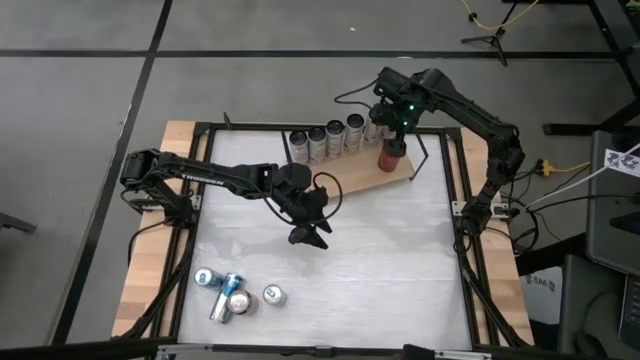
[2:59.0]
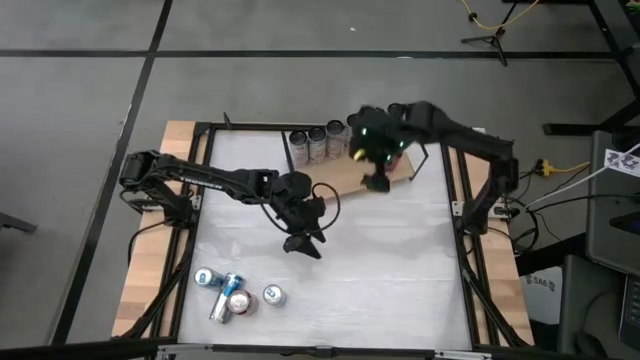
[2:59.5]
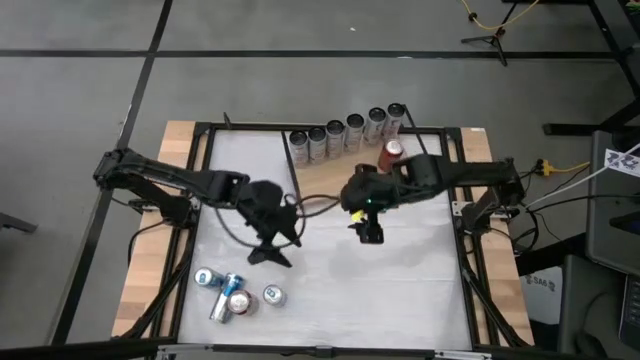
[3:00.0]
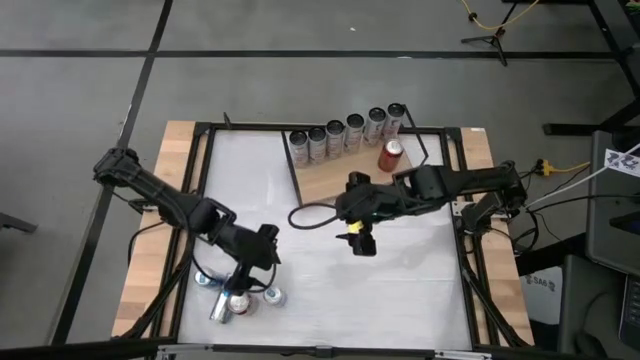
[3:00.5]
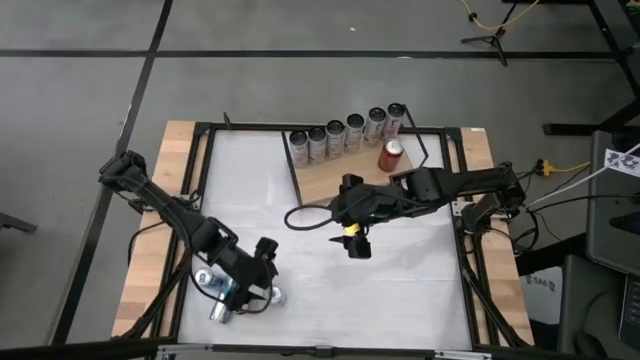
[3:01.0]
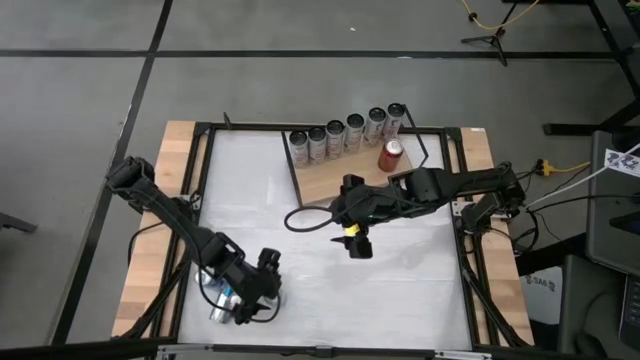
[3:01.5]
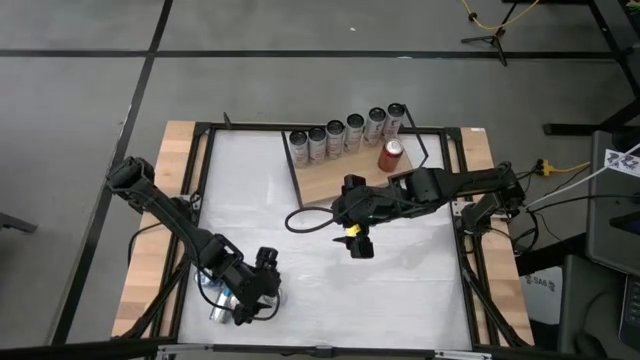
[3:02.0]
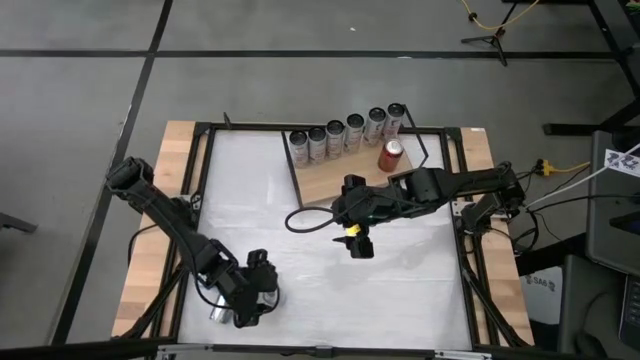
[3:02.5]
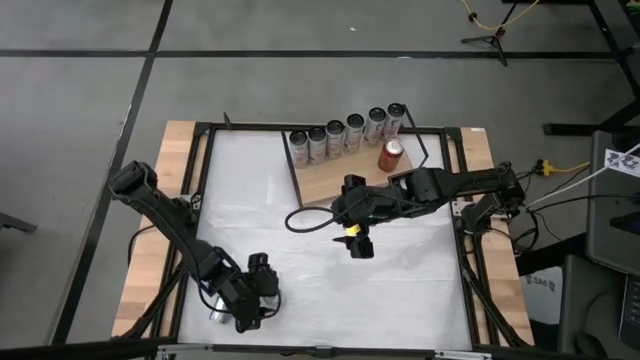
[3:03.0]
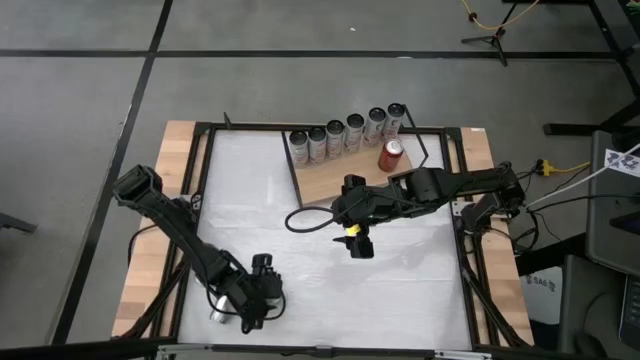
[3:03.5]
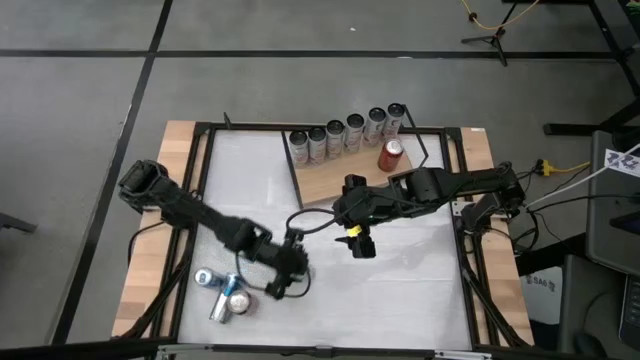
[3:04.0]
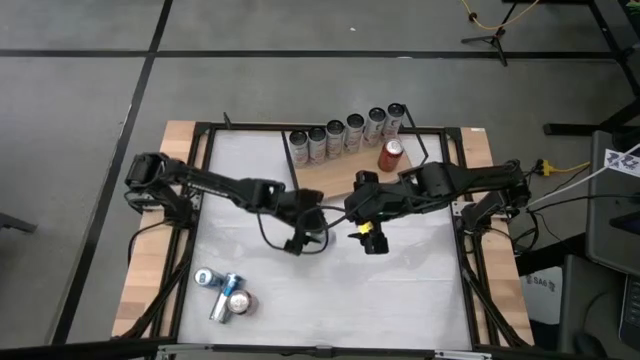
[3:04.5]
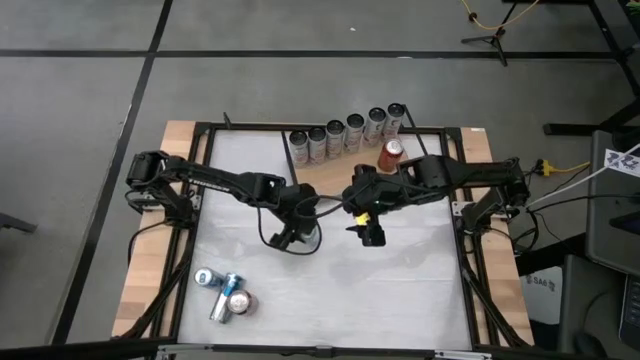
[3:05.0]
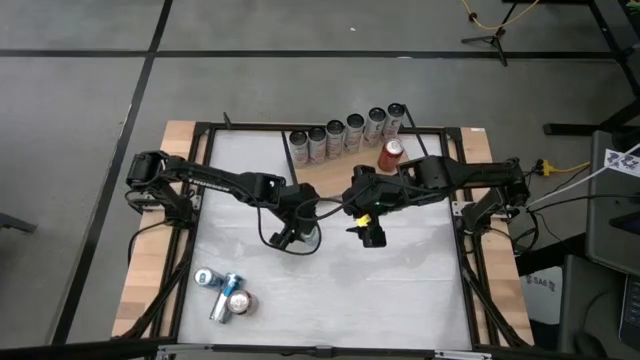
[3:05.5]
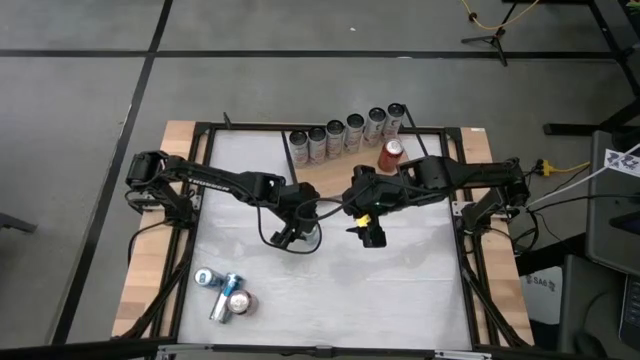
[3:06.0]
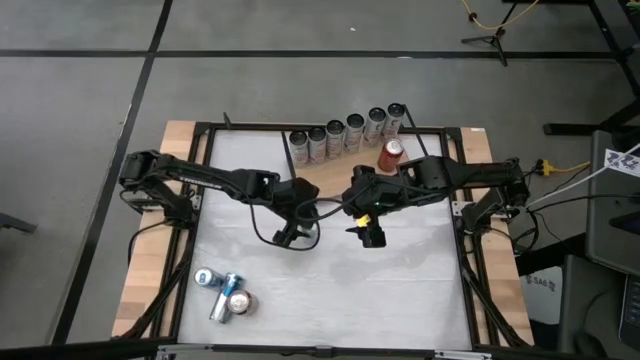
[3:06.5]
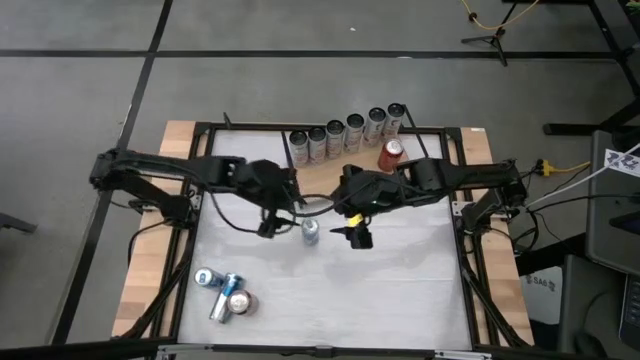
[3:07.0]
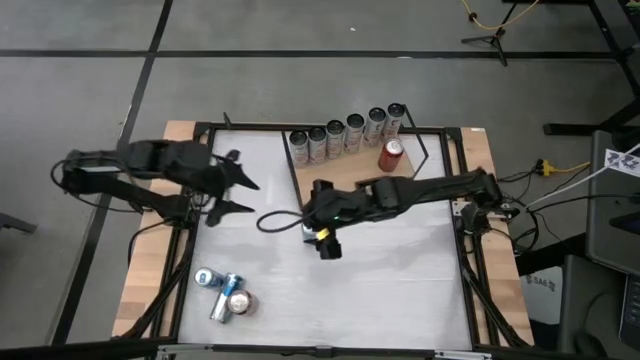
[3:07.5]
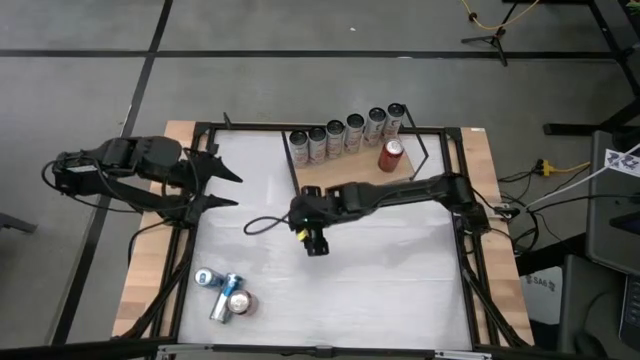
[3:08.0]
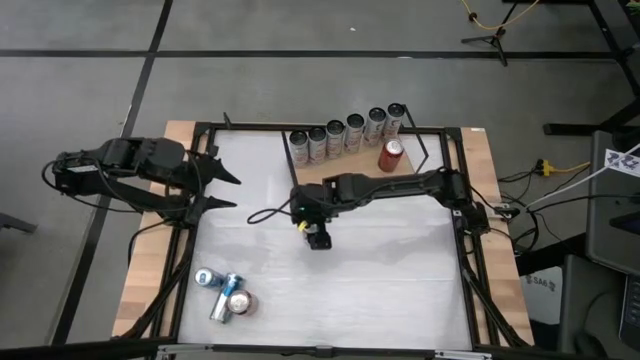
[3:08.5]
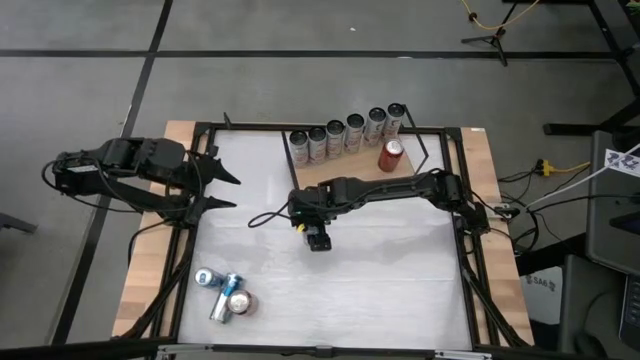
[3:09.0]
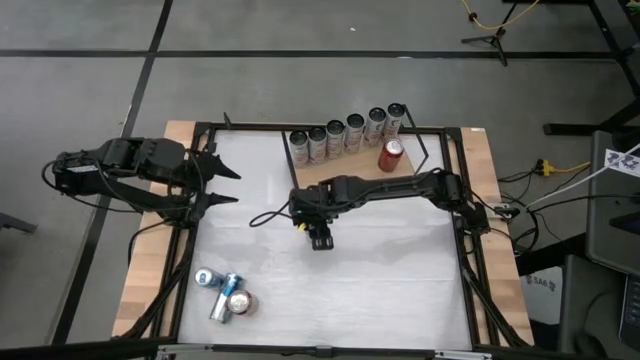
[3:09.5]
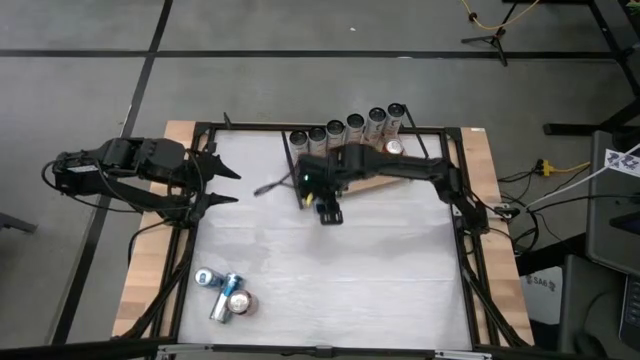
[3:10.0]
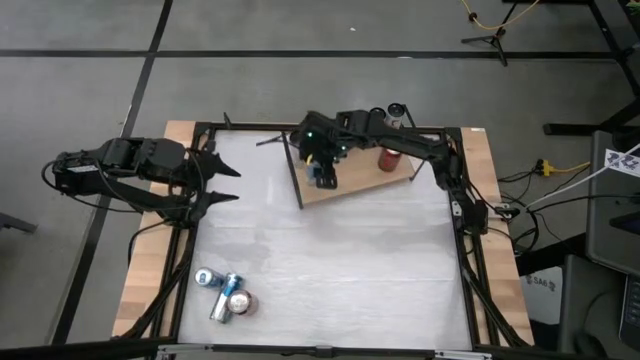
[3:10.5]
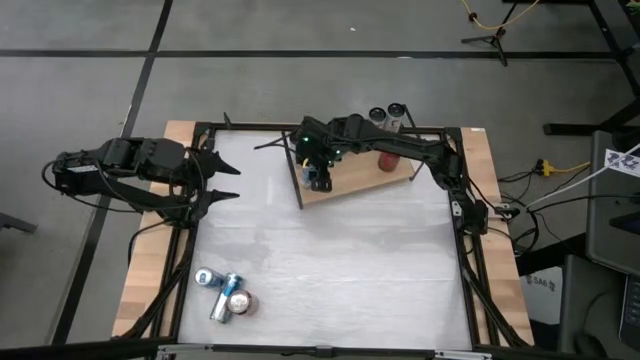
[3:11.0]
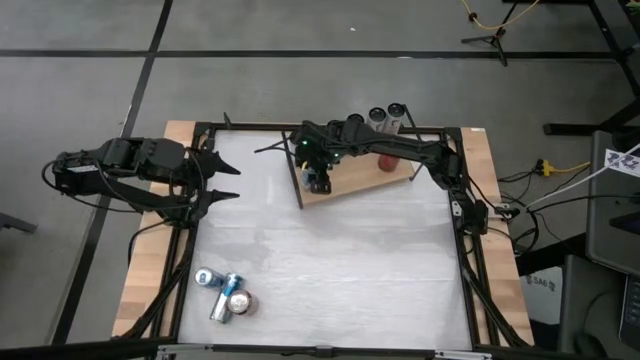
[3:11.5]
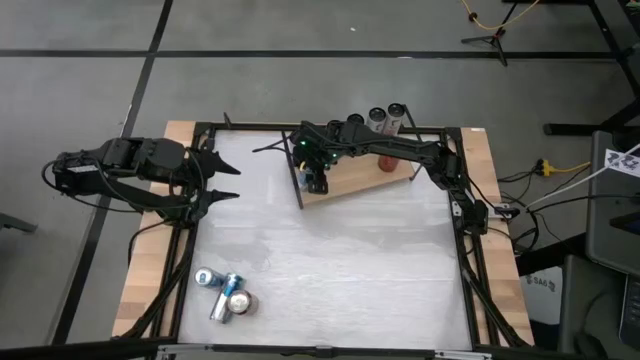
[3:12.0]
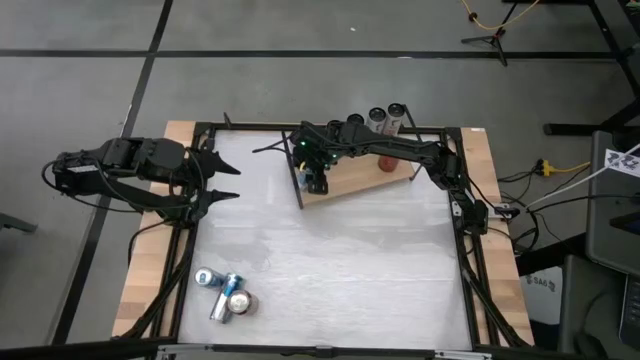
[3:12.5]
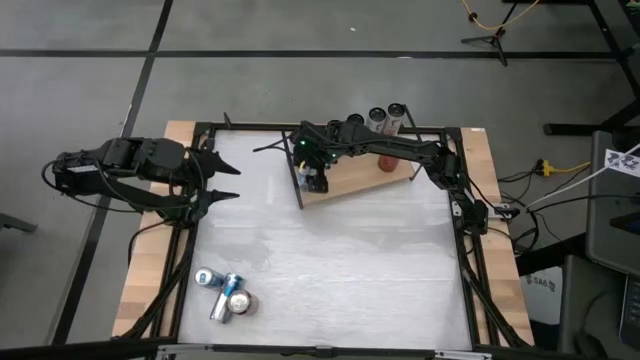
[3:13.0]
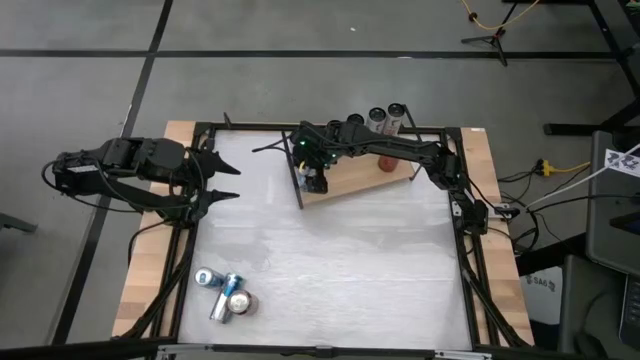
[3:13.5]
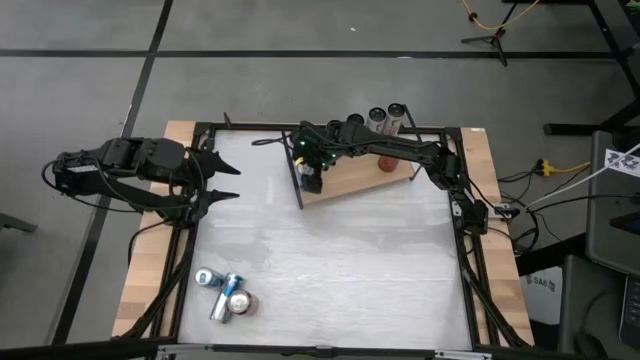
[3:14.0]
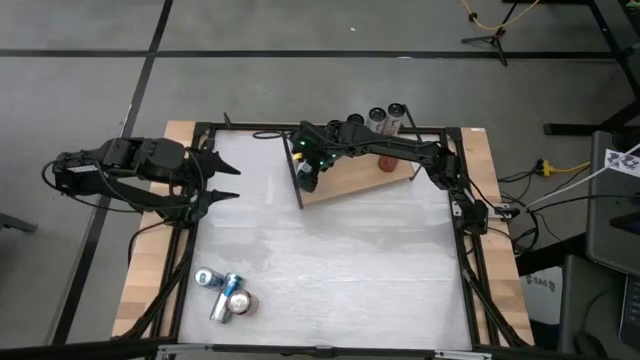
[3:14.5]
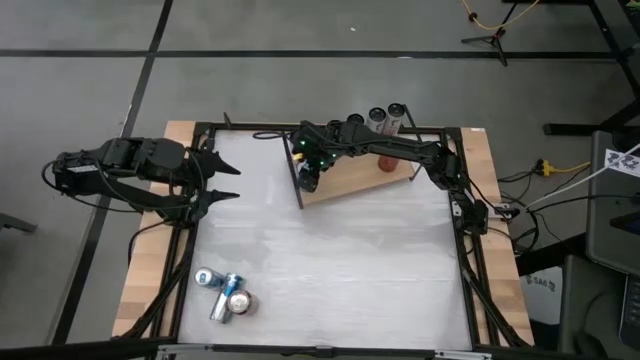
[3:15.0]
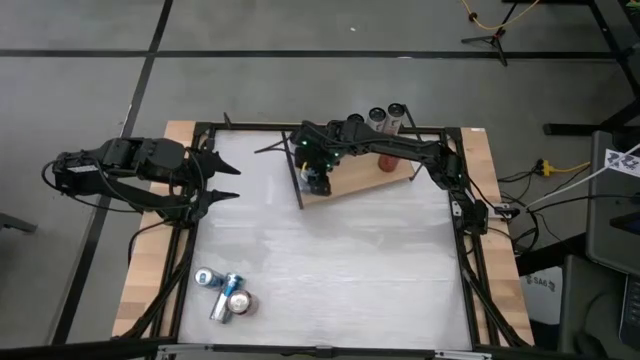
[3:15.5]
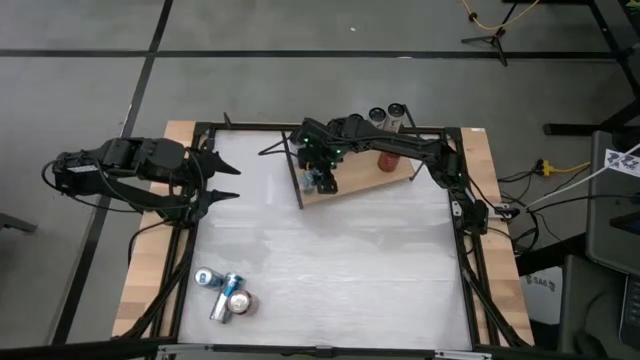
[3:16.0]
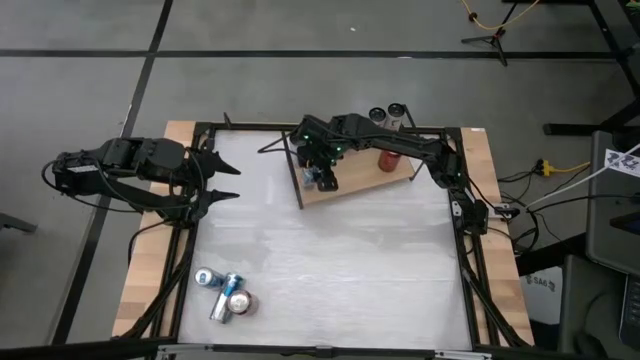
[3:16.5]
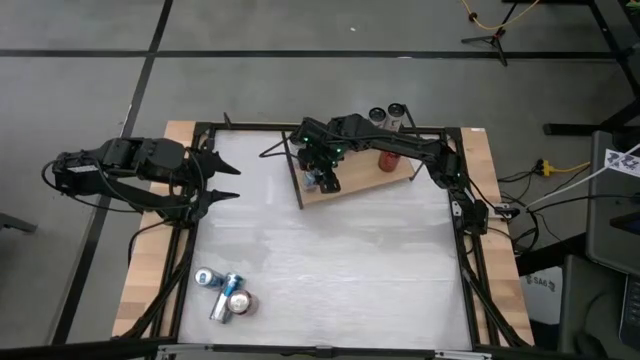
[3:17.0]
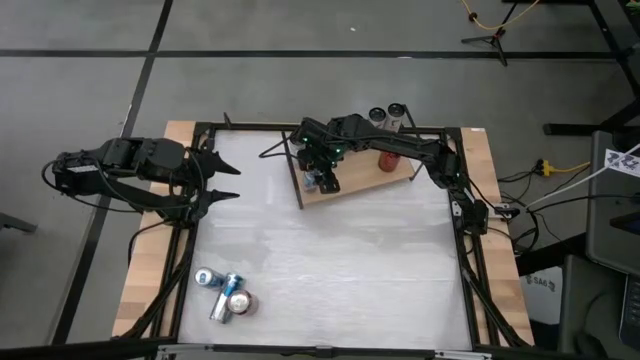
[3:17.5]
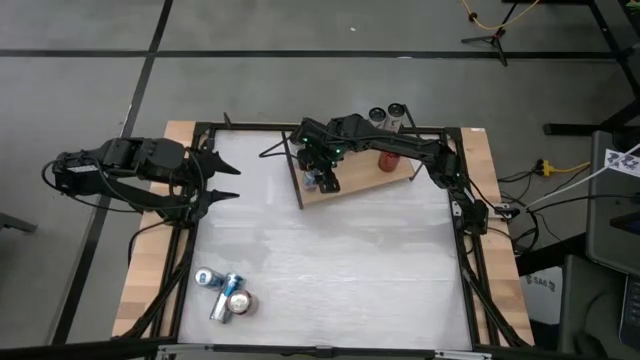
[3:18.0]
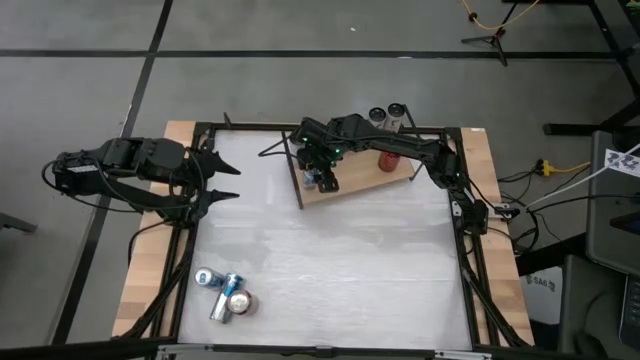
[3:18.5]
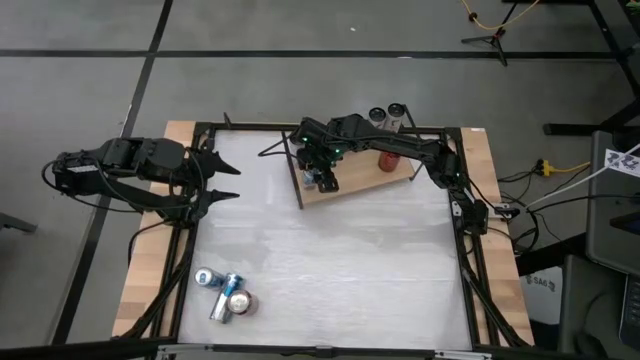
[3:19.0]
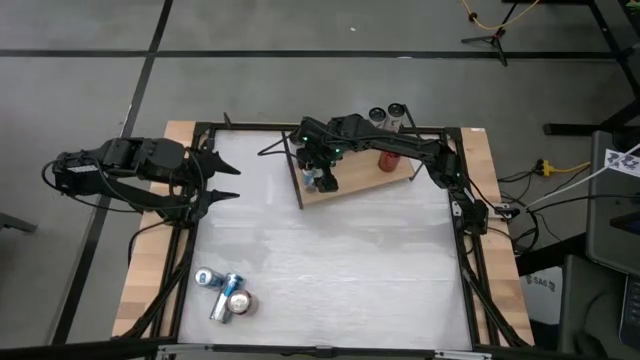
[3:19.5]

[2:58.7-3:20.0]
Task: Place canned beverage on shelf
Put the blue soda can on the shelf
